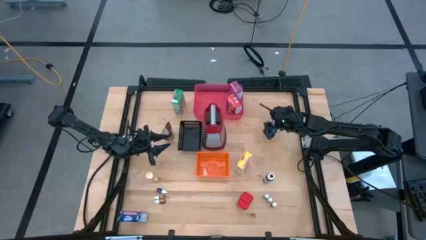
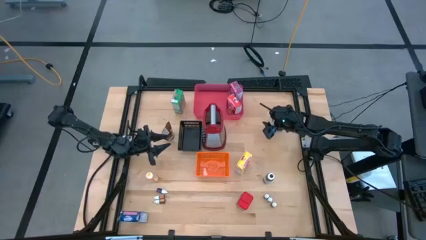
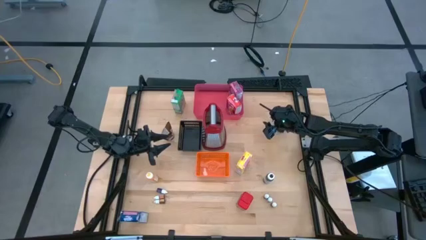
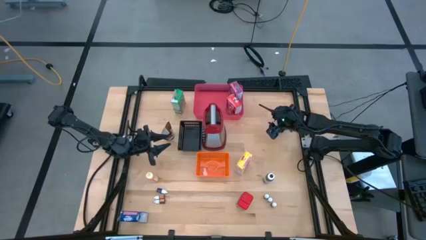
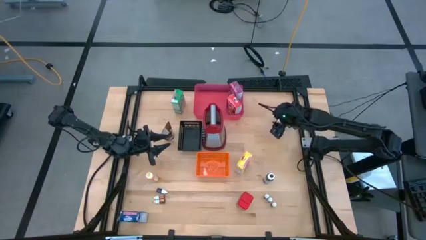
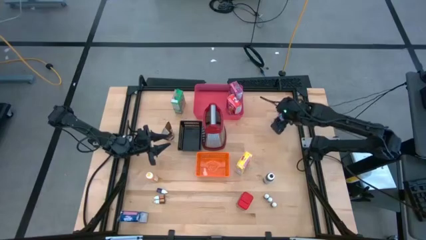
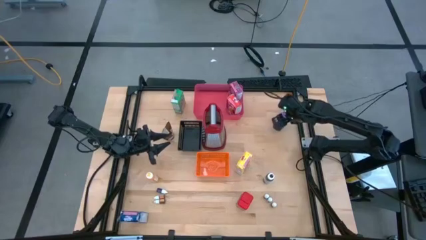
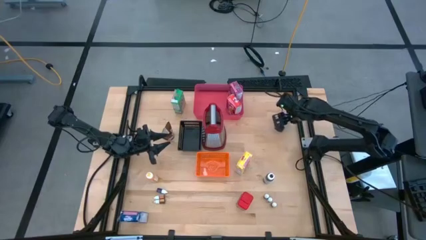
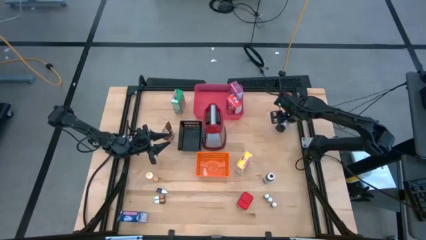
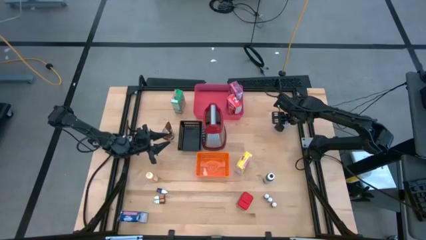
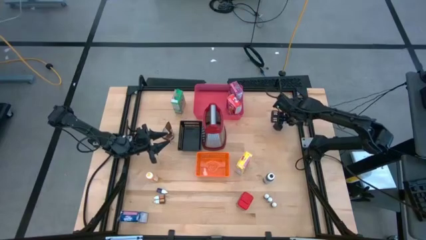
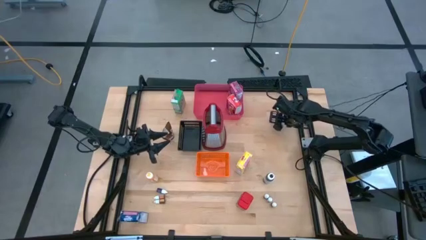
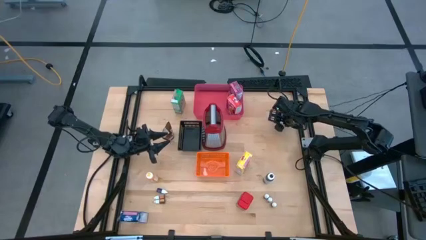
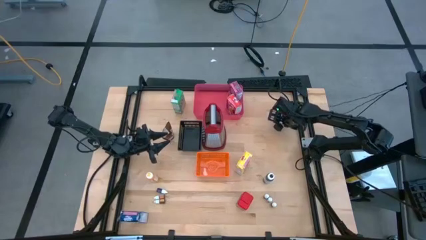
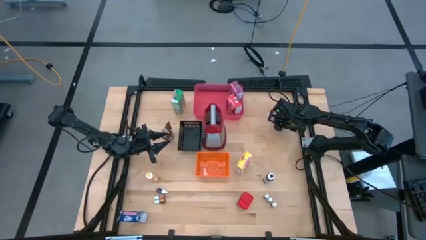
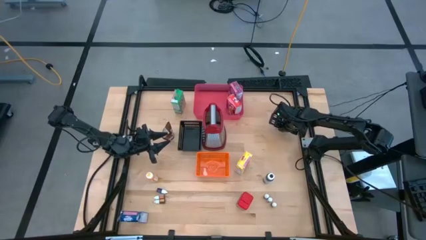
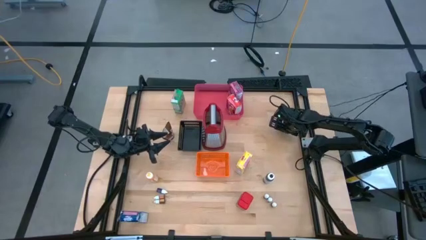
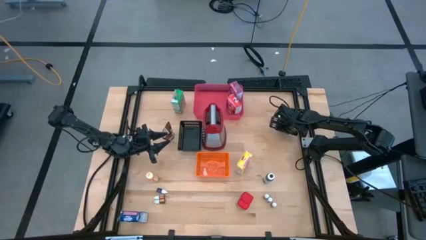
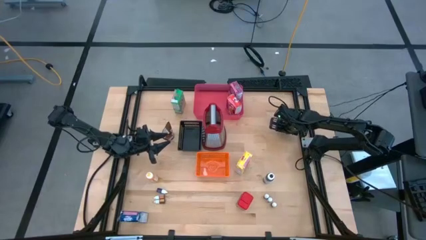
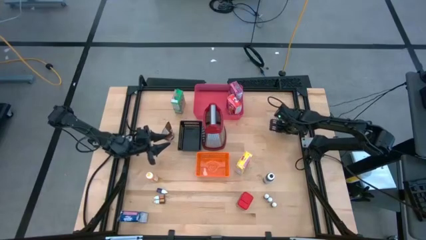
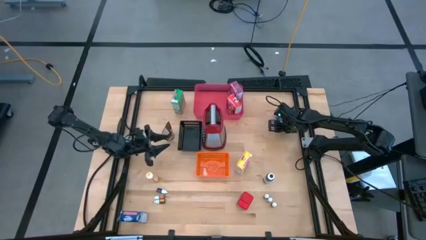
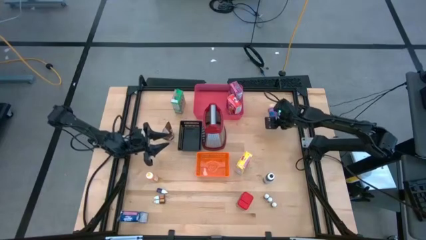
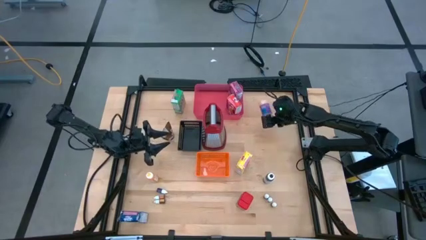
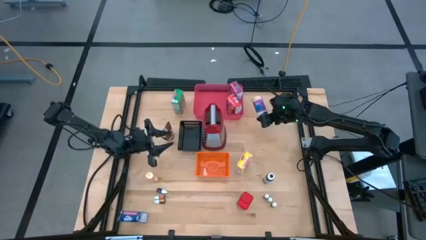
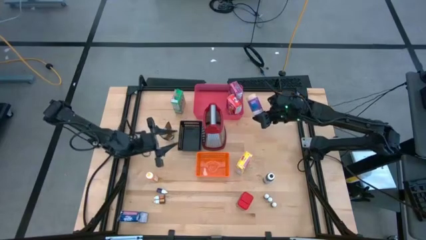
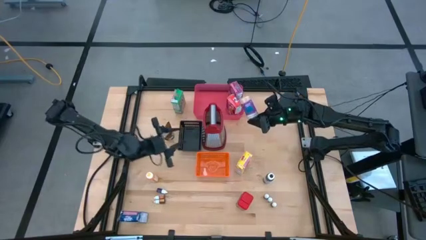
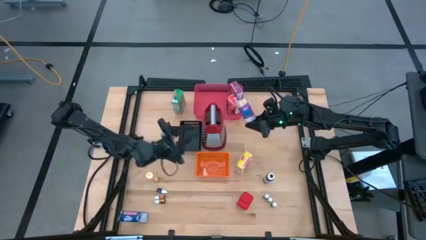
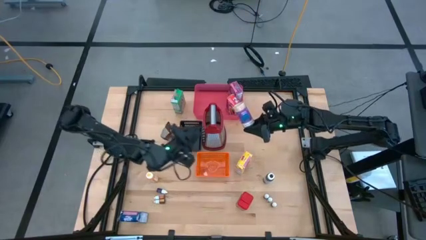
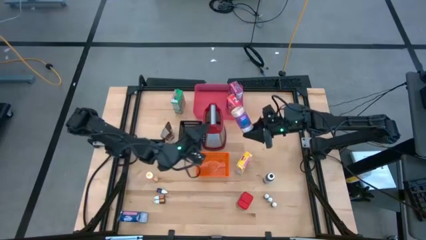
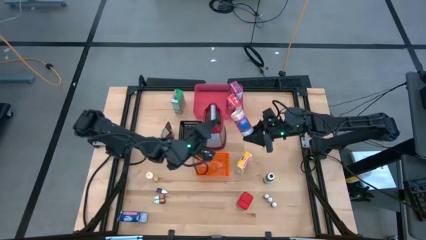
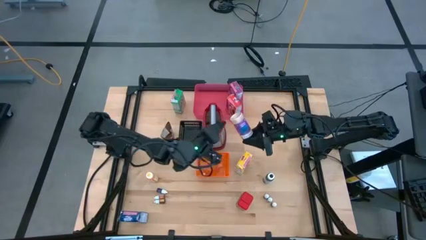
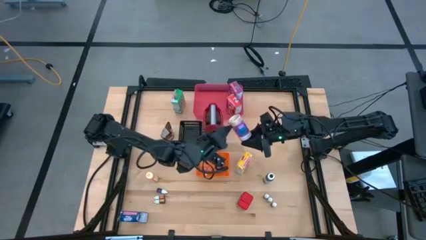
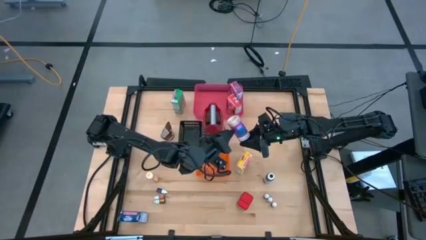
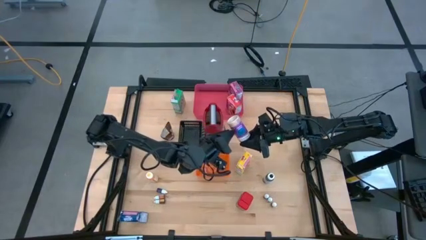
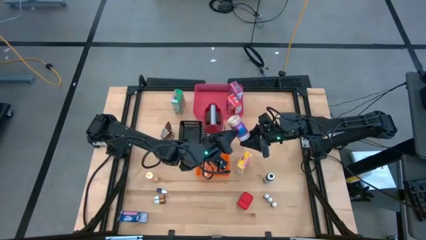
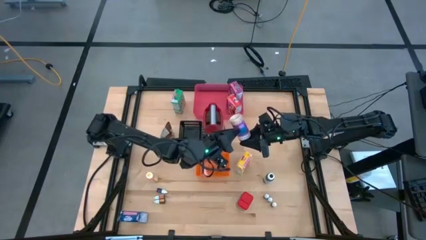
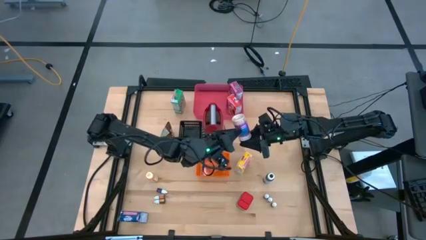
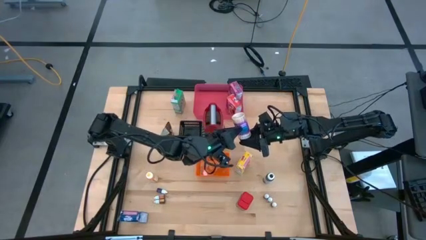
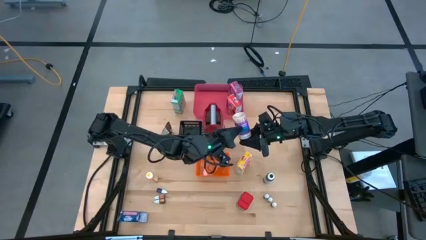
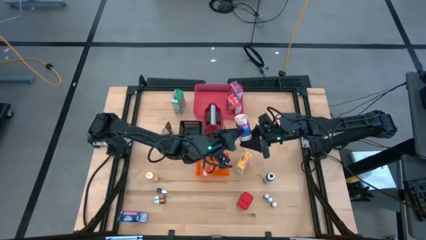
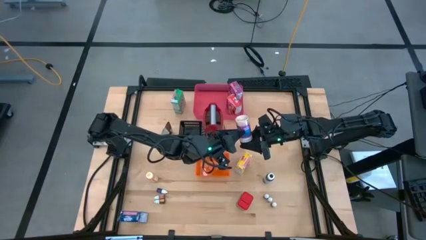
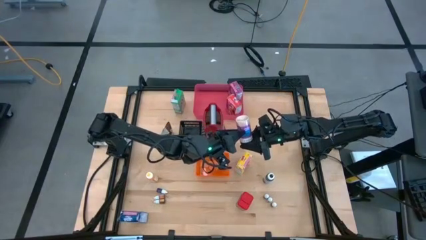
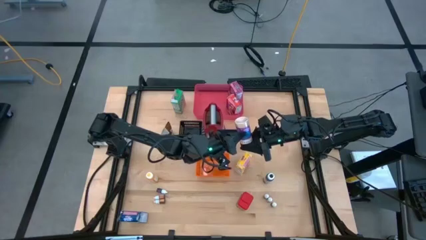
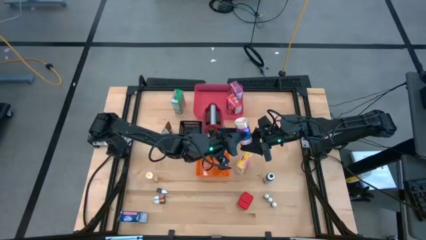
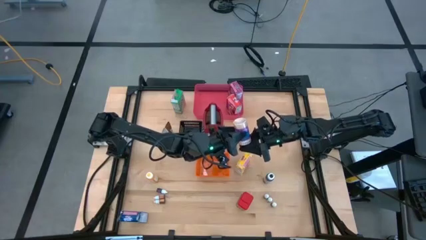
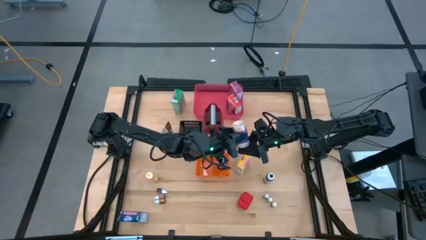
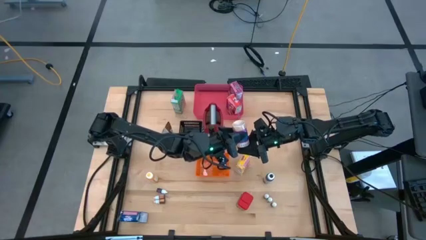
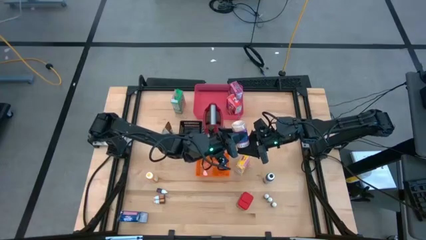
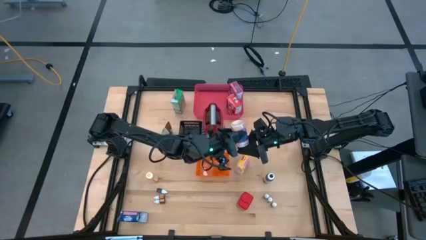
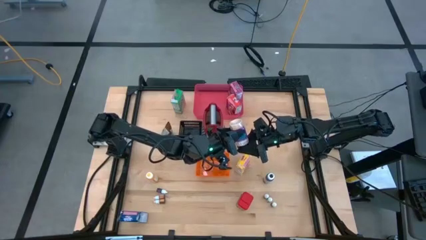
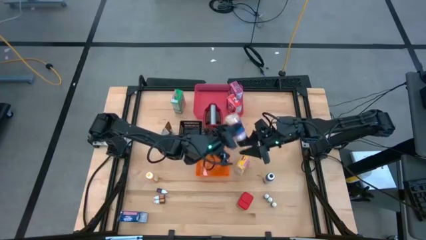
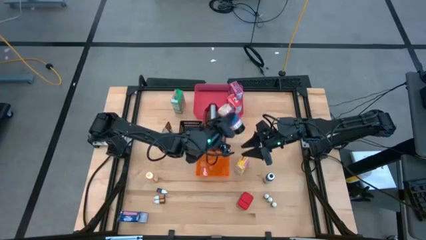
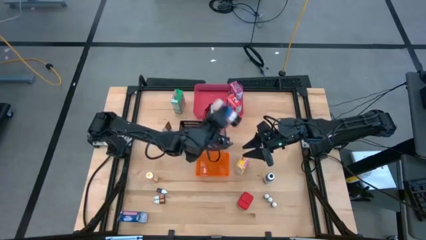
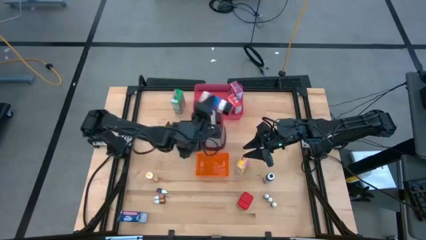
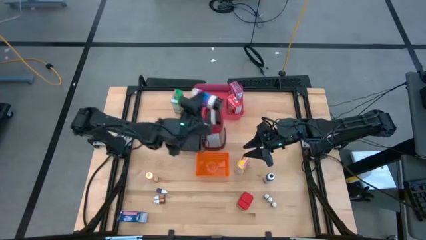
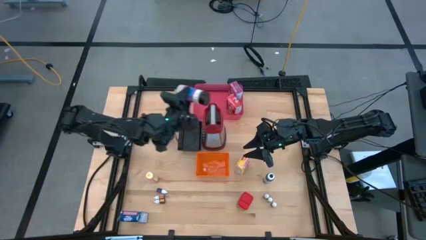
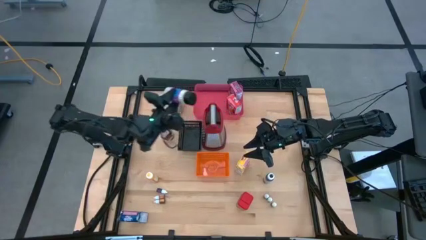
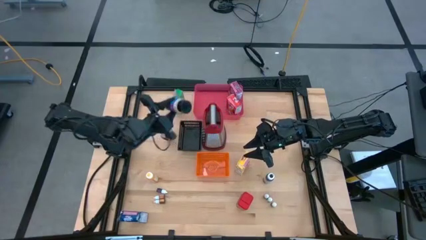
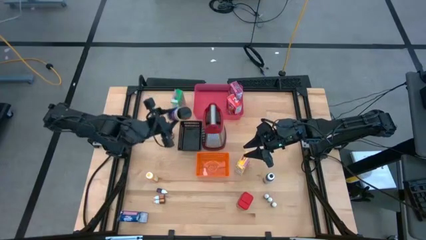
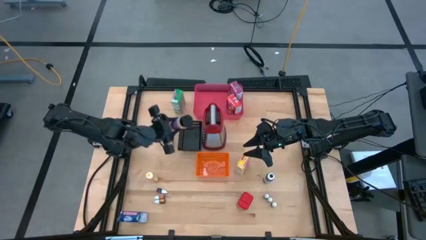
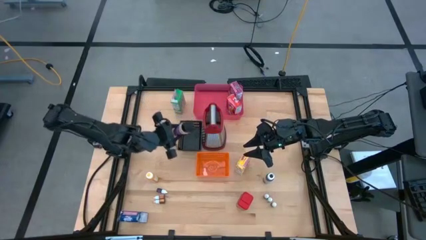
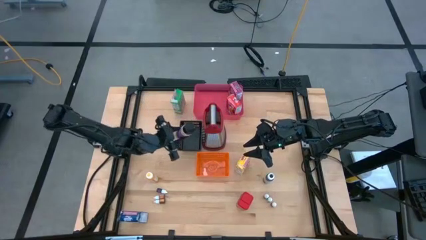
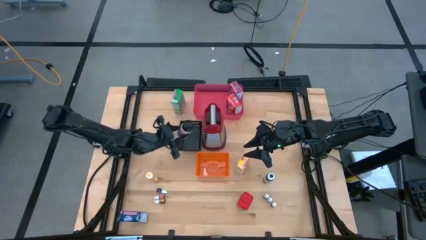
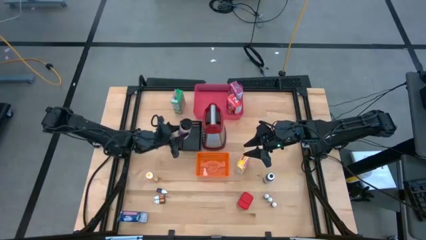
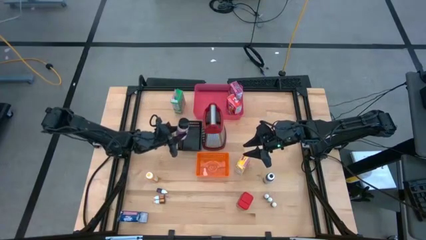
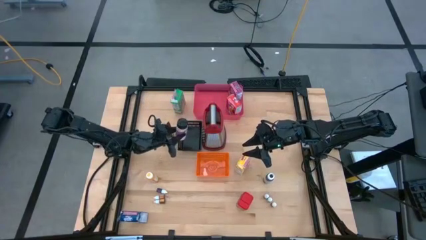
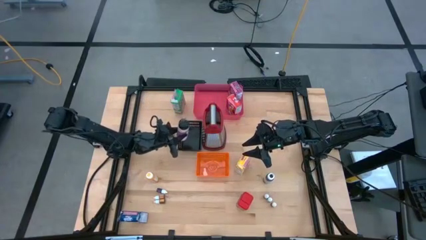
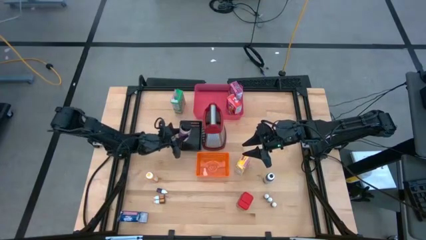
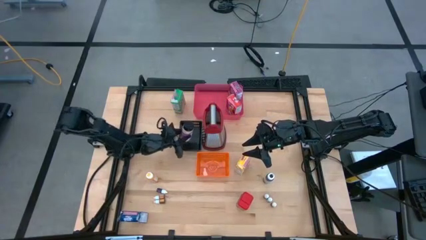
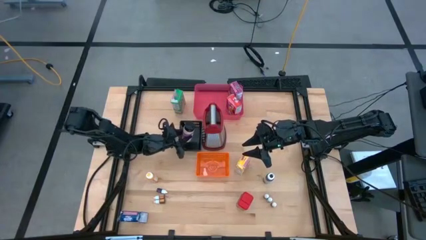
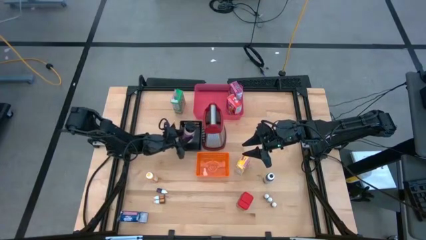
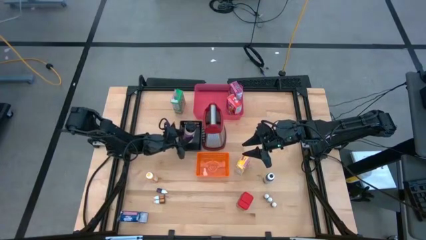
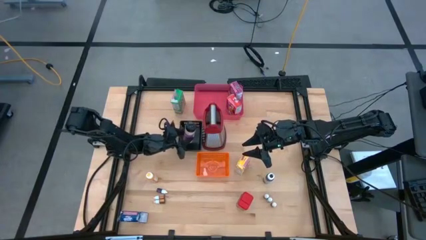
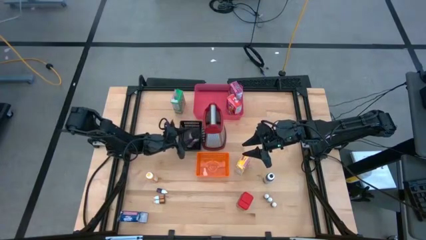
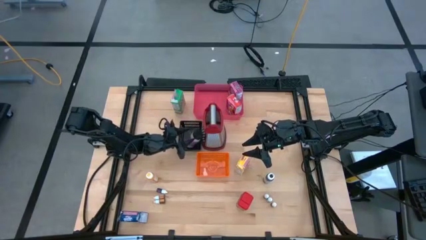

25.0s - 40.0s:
Task: Pick & Place Kitchen Items
Put the violet seasoning bottle into the black bin
